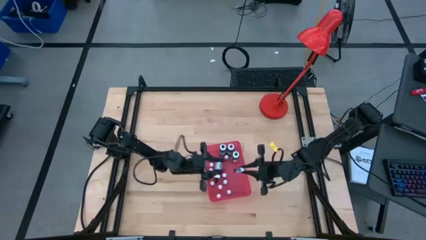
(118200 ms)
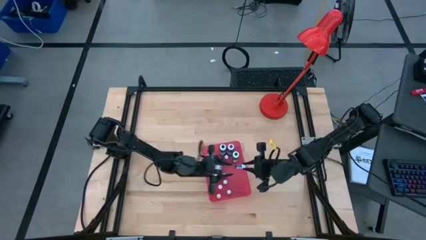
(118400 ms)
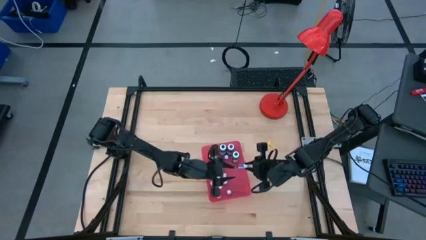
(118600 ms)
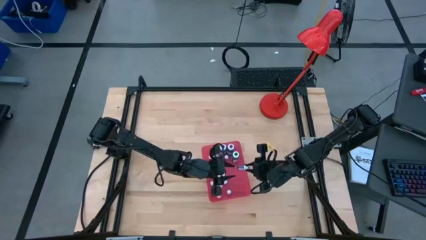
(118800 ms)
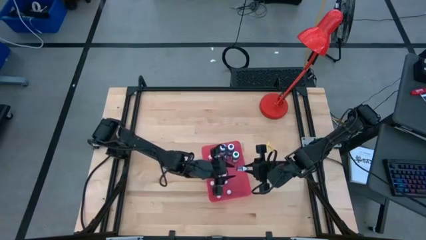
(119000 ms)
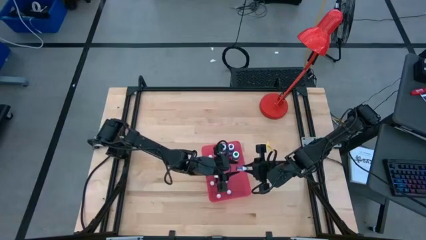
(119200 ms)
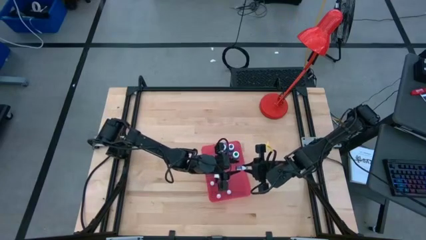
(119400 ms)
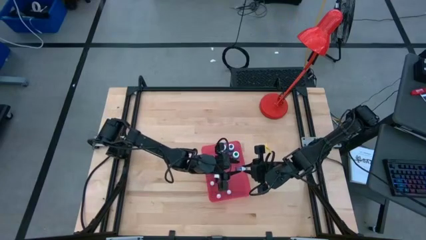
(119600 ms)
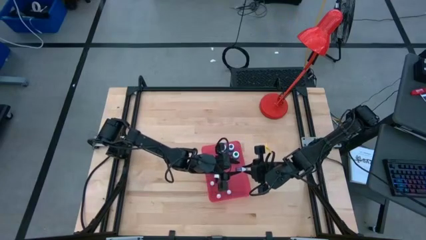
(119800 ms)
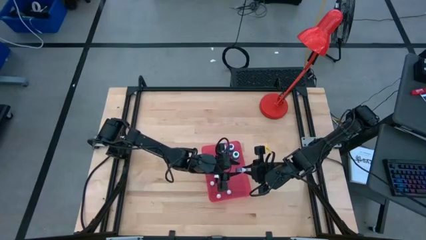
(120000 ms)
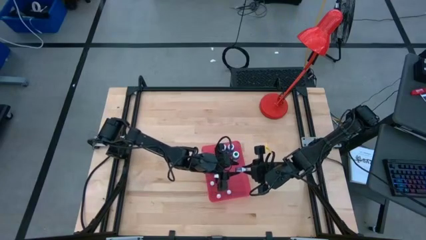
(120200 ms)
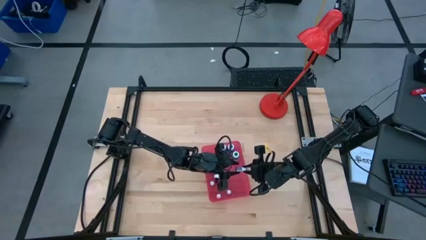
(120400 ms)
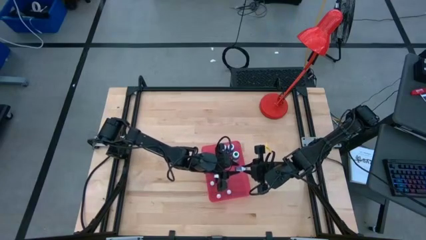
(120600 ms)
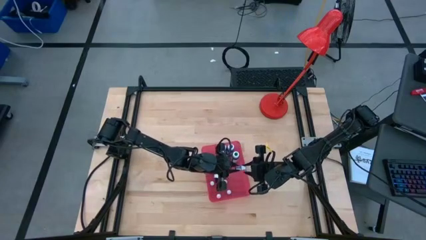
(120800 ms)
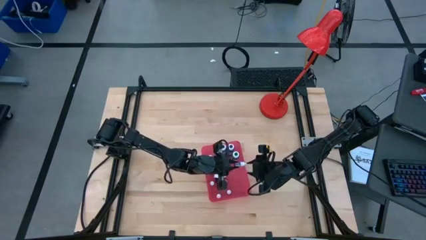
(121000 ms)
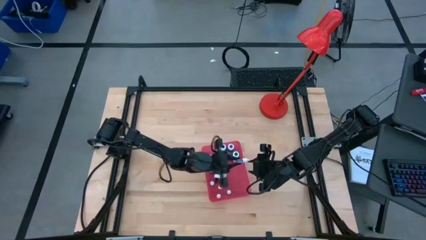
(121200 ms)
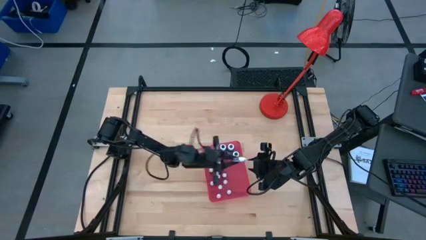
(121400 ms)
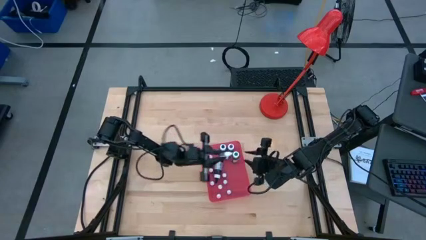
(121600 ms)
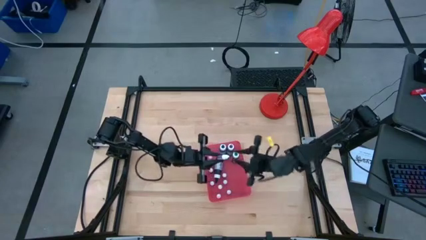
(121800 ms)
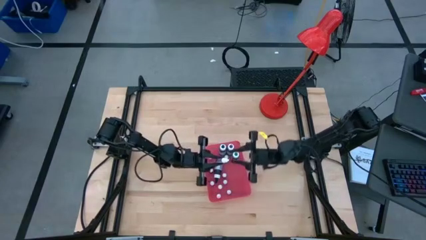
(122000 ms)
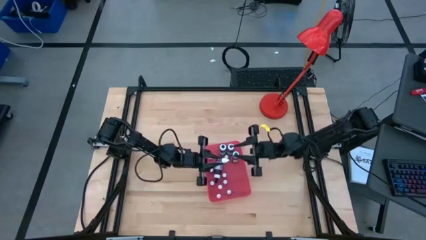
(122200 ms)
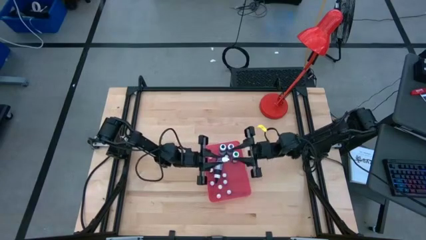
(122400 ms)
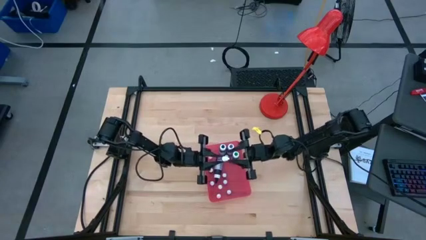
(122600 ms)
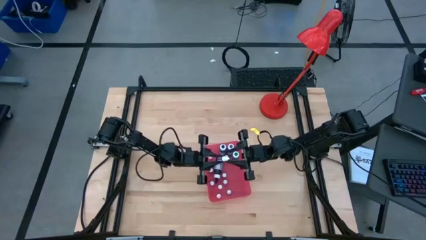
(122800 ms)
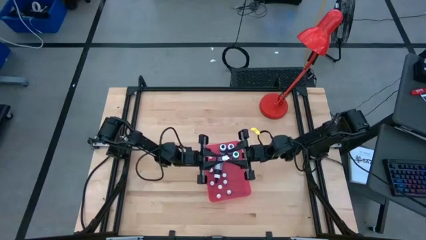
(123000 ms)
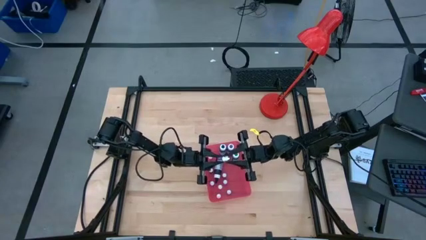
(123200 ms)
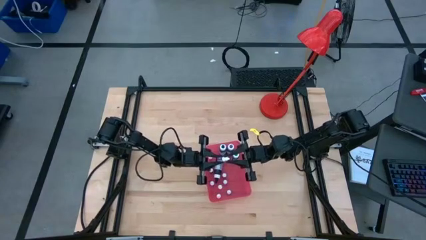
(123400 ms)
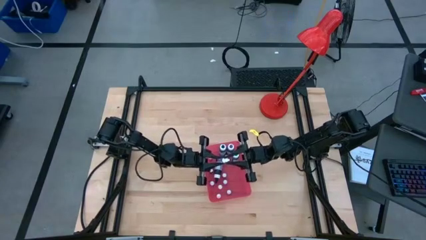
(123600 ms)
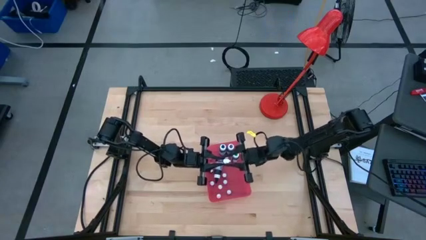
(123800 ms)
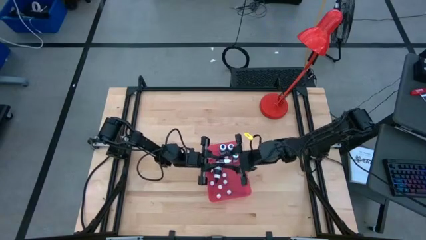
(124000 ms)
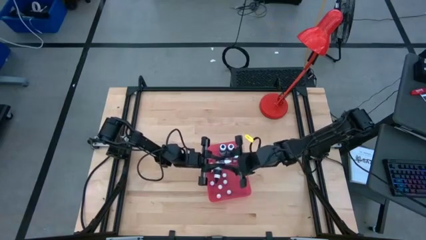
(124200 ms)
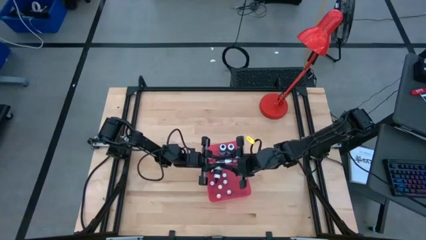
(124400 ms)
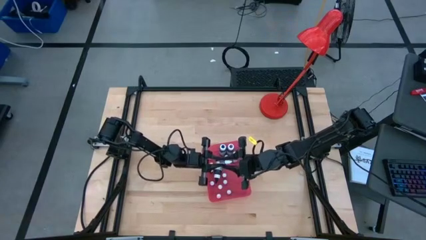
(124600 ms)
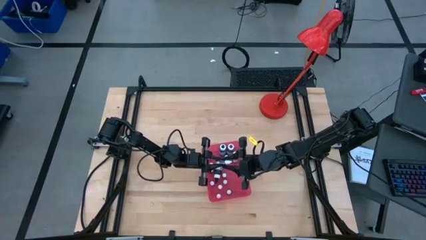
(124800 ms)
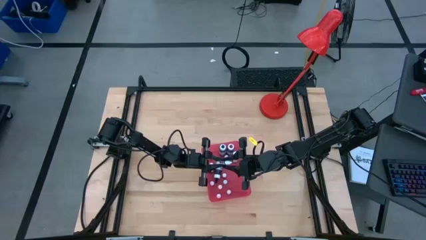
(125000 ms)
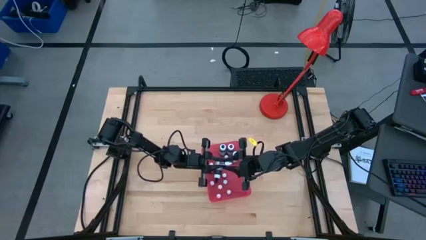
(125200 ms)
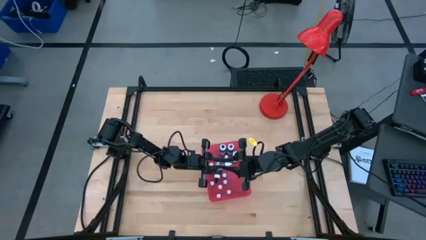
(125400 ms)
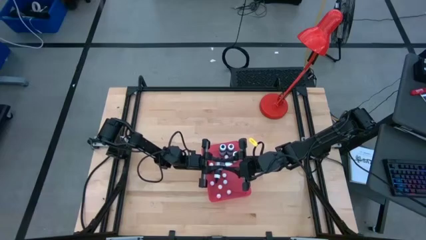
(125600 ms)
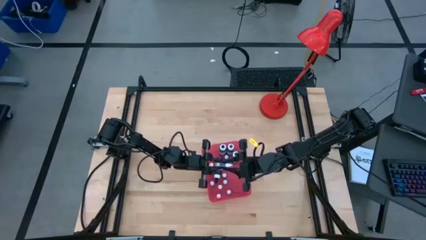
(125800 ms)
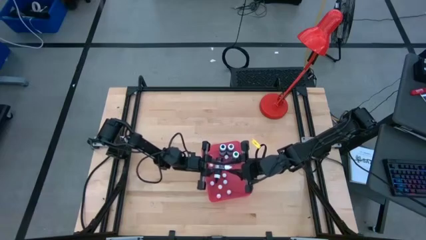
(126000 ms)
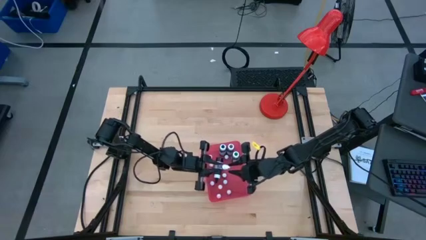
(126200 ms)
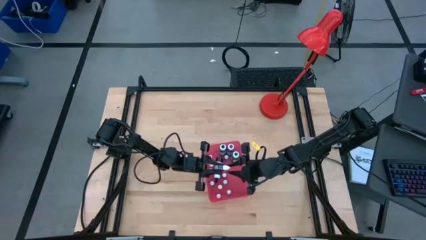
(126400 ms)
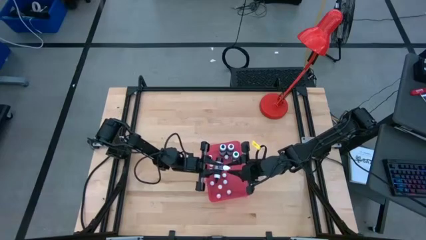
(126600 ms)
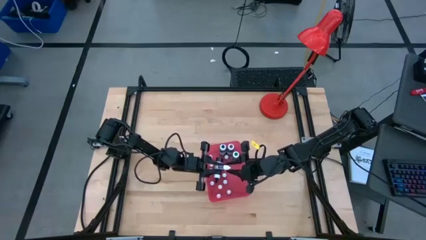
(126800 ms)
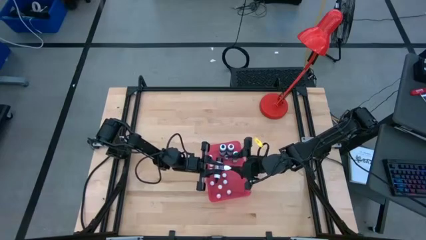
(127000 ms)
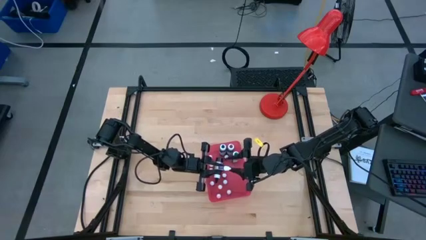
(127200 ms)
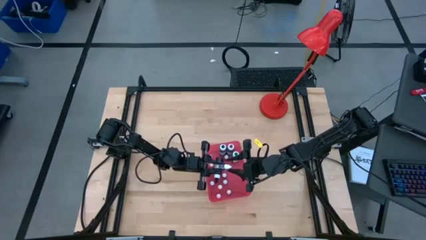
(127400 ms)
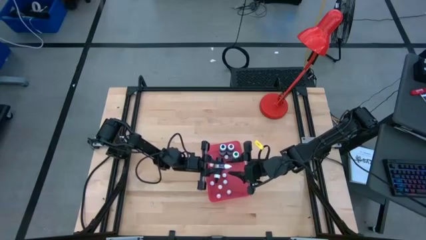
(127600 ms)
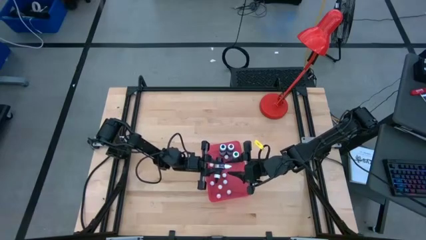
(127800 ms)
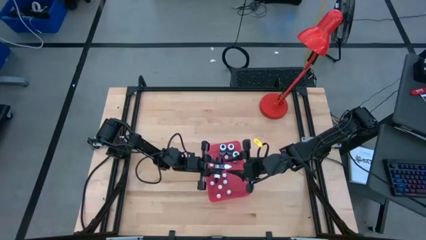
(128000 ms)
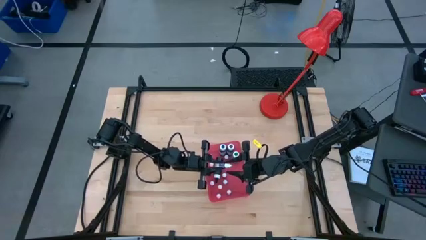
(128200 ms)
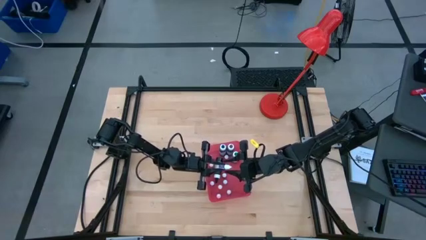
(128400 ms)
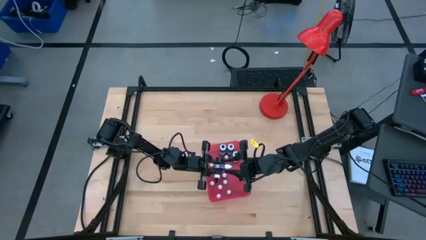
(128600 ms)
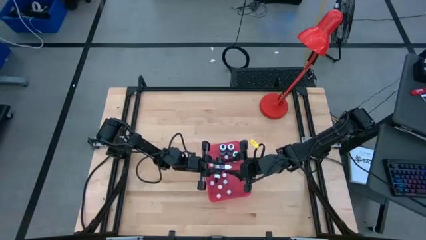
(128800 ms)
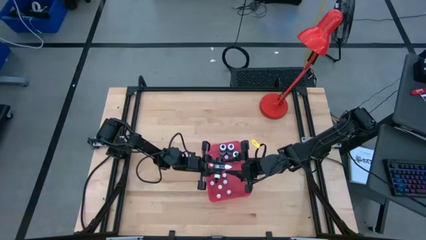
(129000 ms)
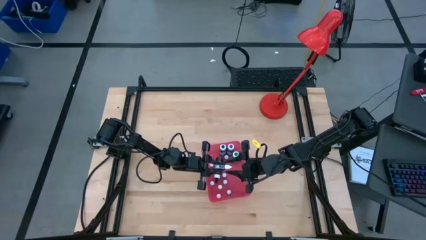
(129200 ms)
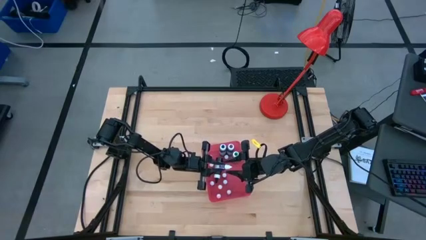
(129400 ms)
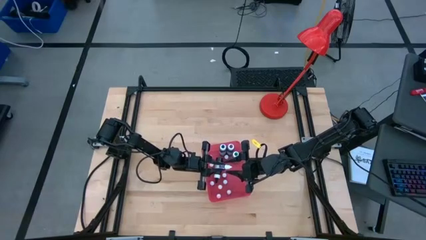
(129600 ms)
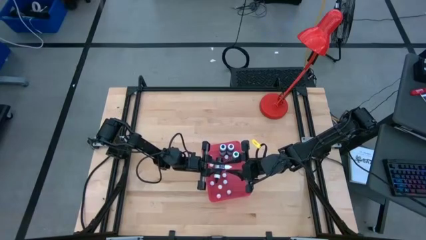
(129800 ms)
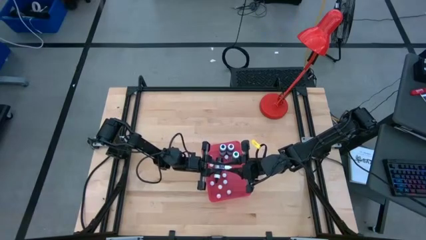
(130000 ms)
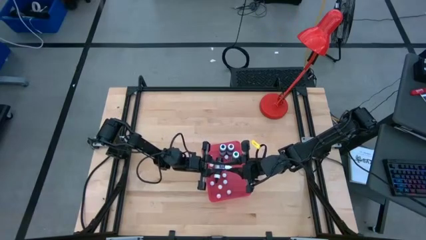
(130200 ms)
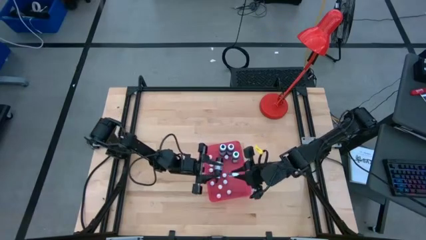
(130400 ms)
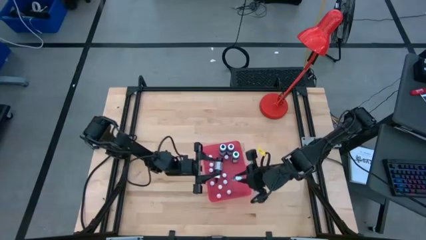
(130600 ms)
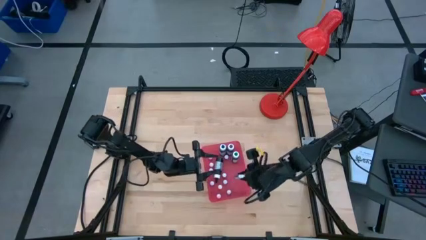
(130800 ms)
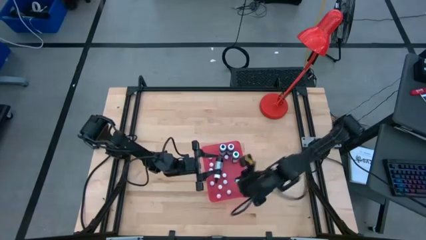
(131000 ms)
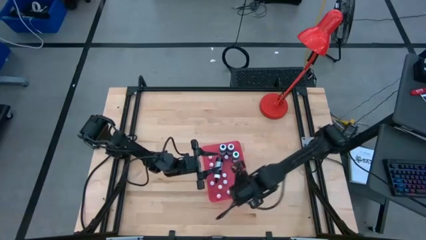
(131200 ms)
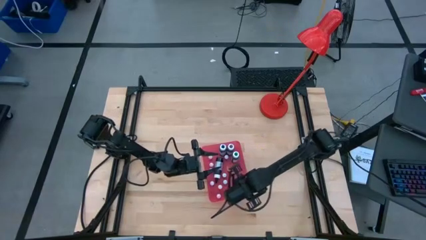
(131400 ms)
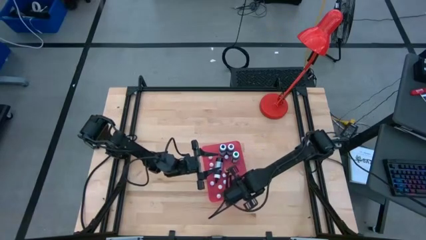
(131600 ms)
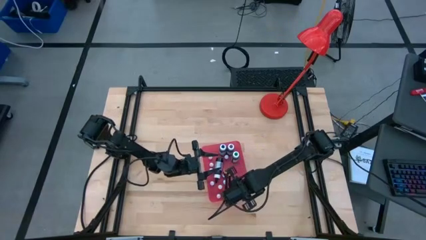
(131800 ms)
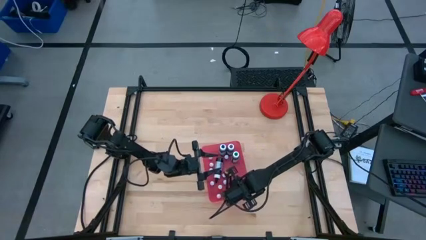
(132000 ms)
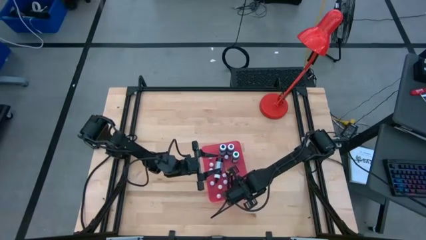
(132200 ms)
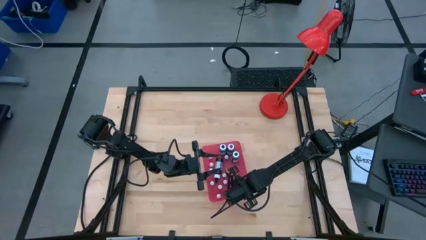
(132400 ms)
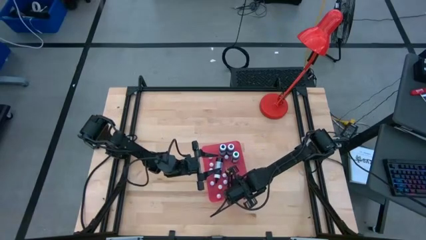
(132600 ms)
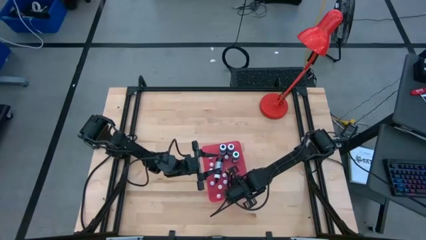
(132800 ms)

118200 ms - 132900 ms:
Task: Pick & Place food coloring
Put the small purple food coloring bottle into the red bin
